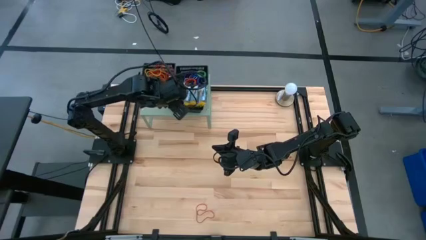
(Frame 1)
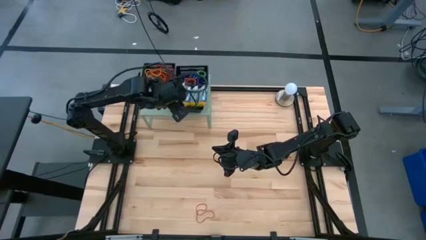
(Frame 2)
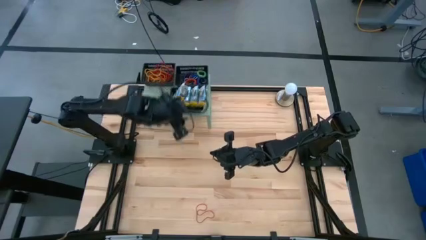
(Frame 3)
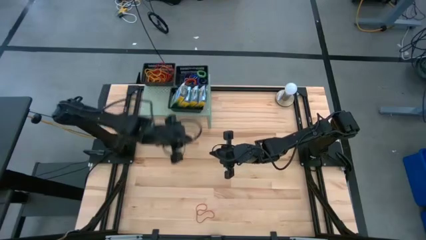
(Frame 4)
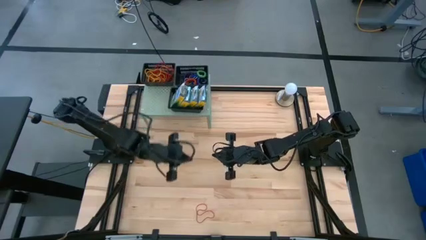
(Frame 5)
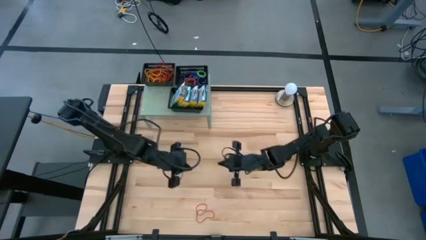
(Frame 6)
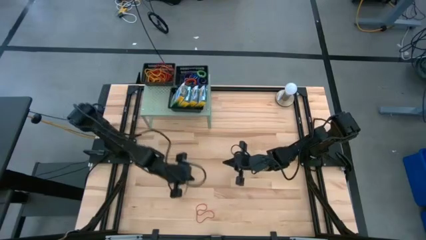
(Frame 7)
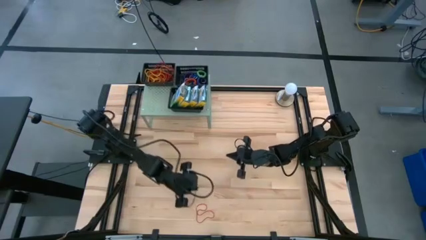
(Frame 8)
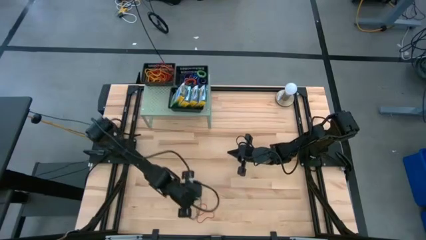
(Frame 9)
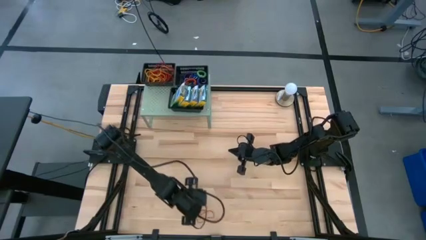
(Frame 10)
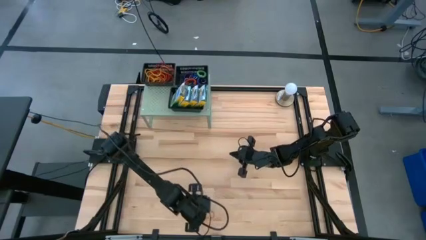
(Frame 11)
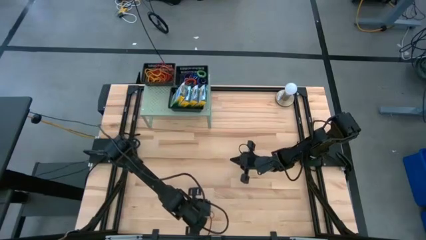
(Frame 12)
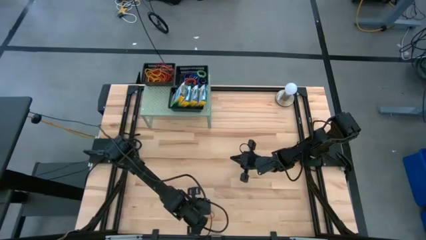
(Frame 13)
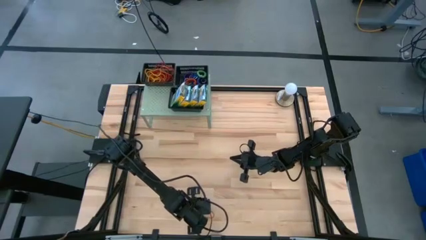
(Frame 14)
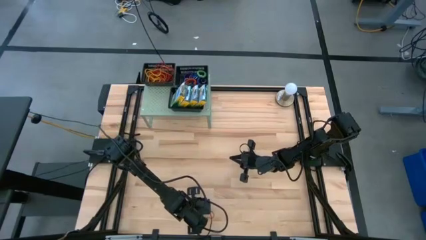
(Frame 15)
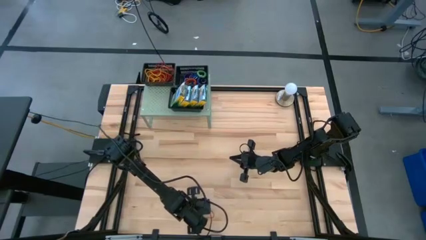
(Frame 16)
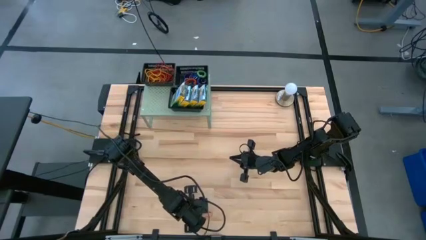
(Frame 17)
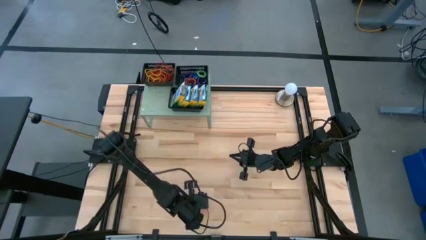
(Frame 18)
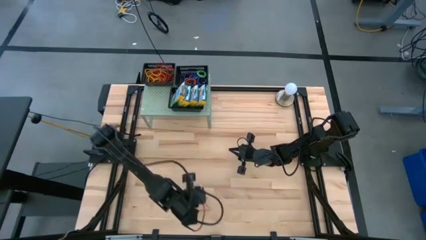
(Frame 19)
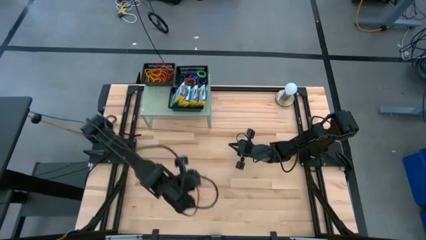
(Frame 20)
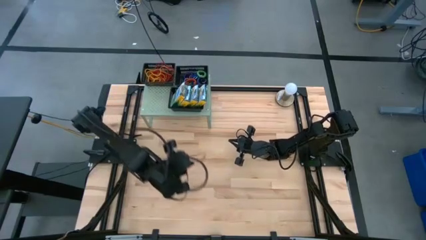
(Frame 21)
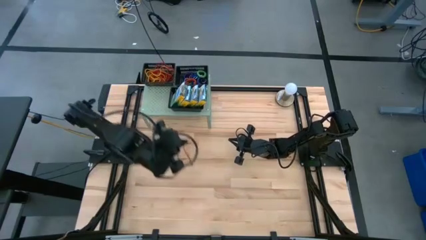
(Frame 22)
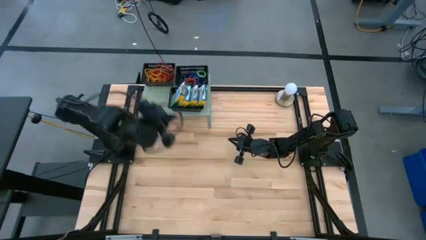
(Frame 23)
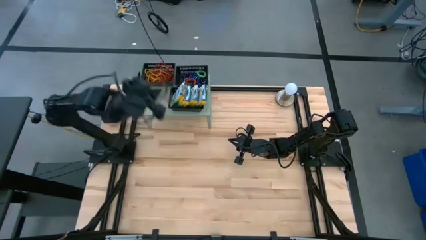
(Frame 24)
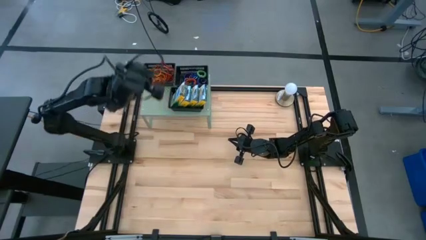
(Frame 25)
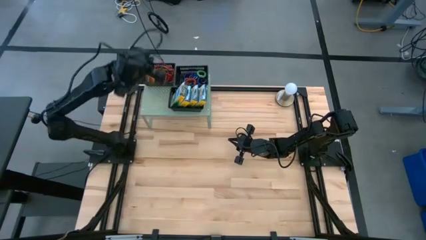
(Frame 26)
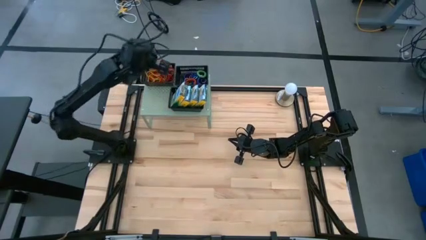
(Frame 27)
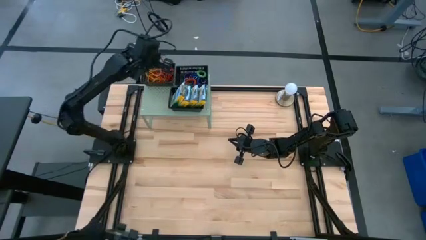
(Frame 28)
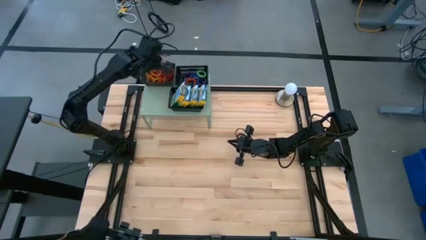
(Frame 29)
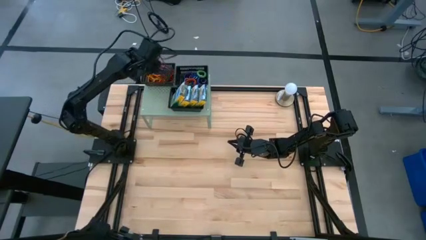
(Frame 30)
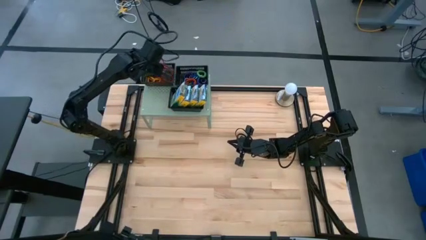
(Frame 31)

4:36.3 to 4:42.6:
Task: Pick & Place Office Desk Supplies
Put the red rubber band into the top left black bin on the shelf

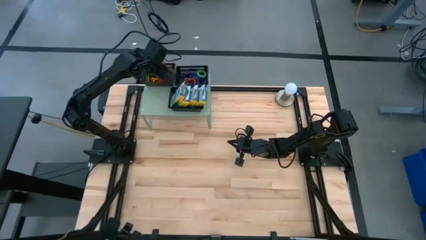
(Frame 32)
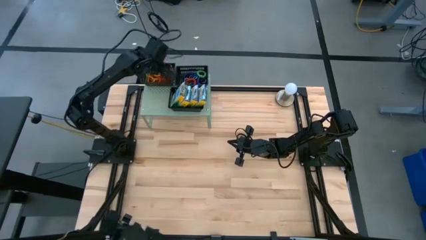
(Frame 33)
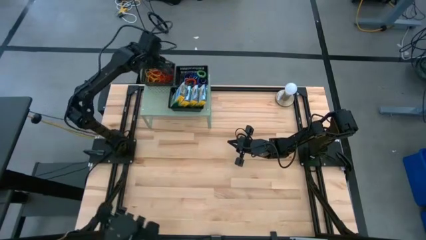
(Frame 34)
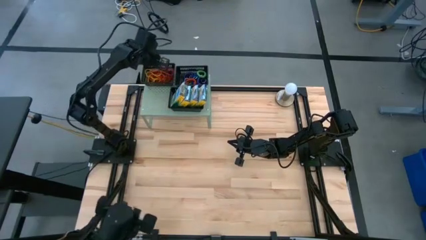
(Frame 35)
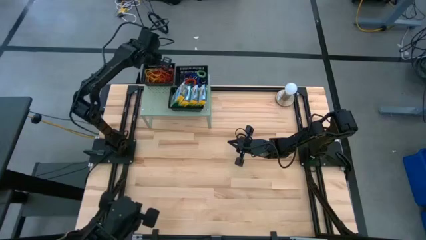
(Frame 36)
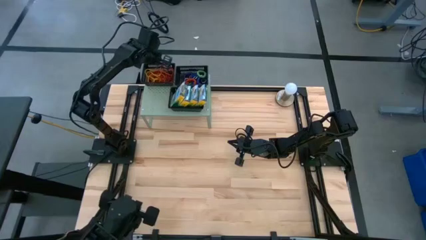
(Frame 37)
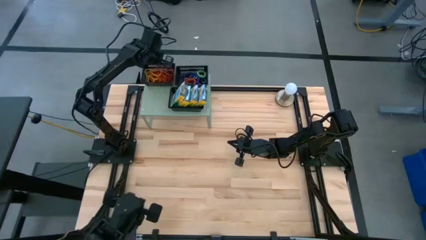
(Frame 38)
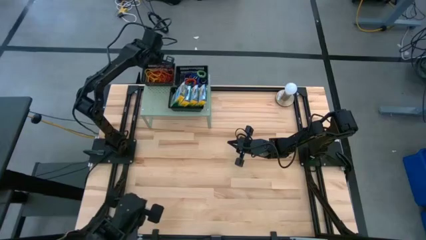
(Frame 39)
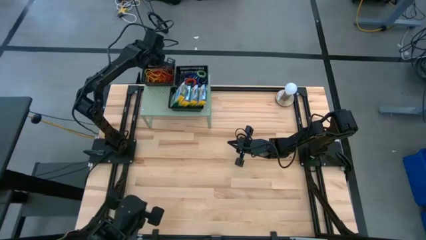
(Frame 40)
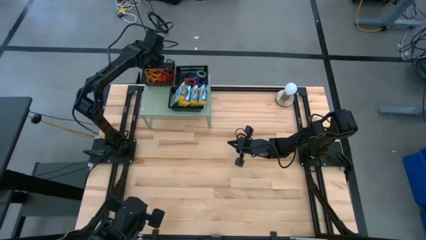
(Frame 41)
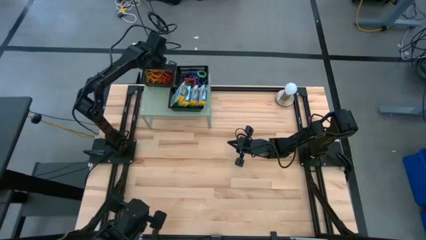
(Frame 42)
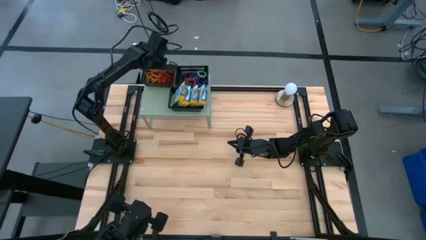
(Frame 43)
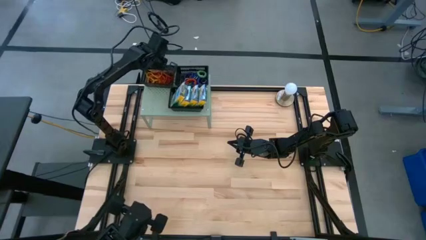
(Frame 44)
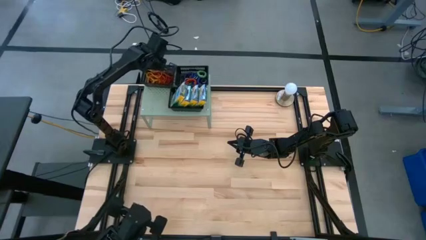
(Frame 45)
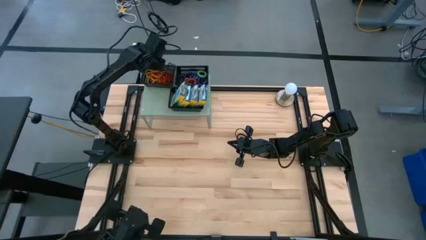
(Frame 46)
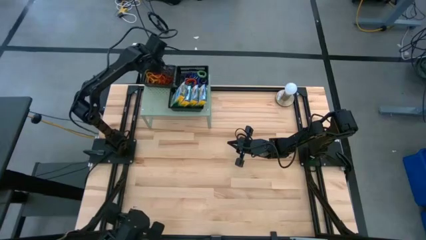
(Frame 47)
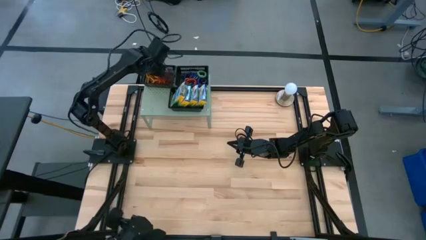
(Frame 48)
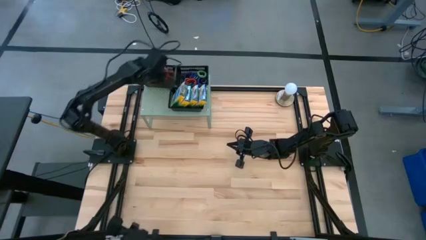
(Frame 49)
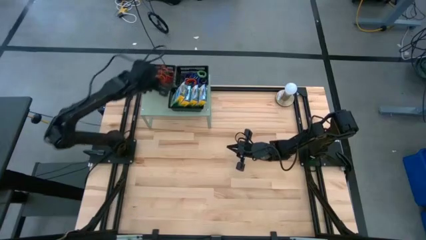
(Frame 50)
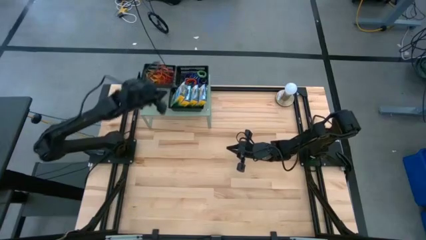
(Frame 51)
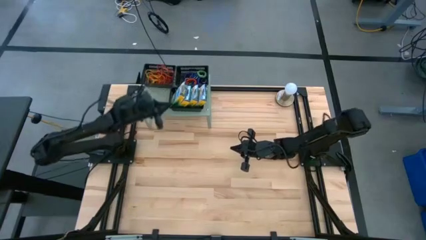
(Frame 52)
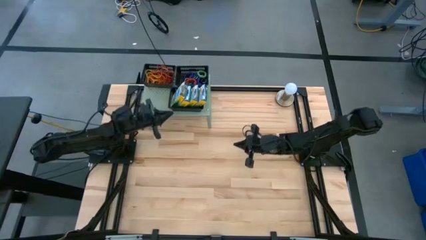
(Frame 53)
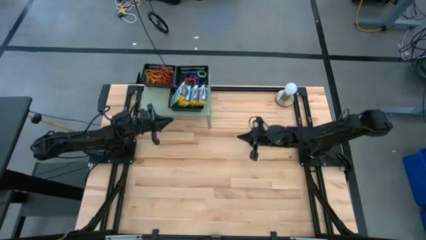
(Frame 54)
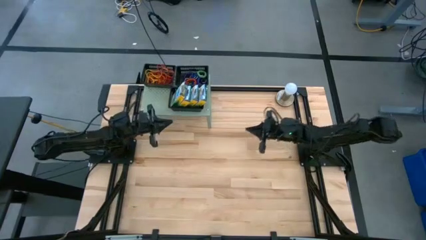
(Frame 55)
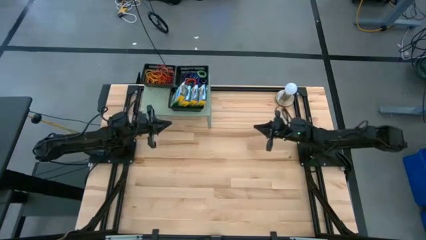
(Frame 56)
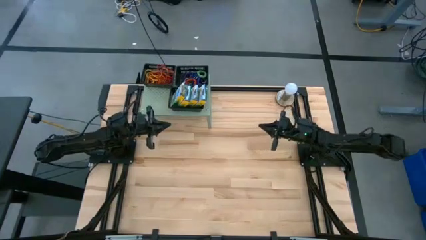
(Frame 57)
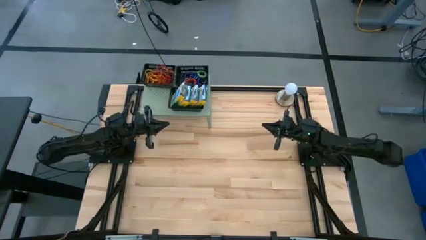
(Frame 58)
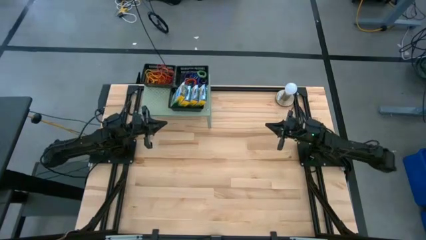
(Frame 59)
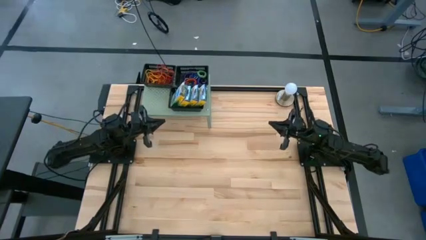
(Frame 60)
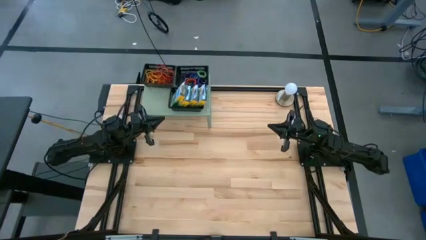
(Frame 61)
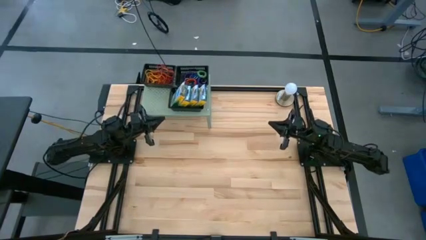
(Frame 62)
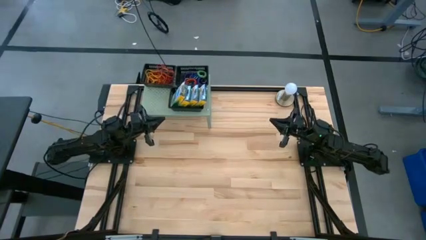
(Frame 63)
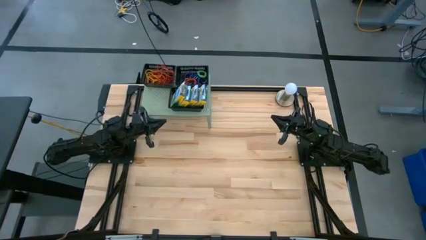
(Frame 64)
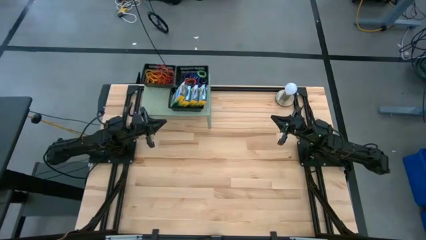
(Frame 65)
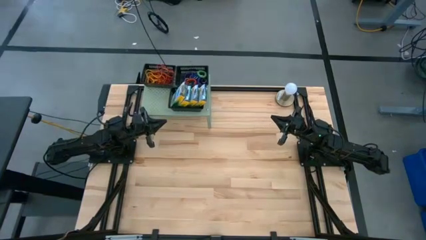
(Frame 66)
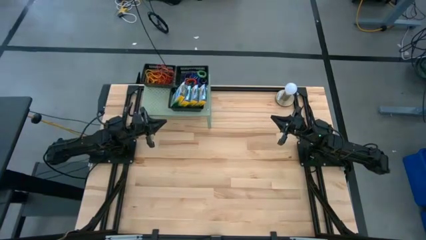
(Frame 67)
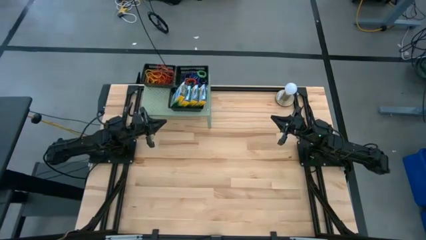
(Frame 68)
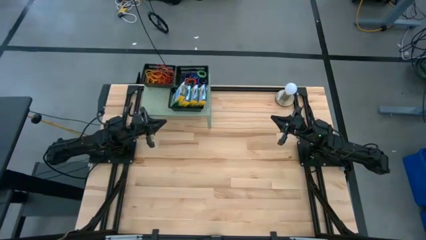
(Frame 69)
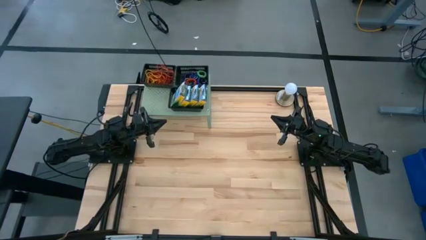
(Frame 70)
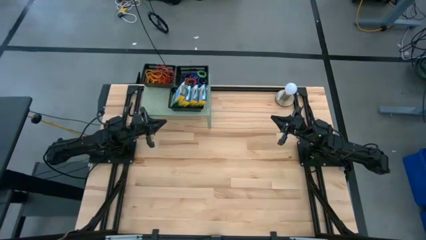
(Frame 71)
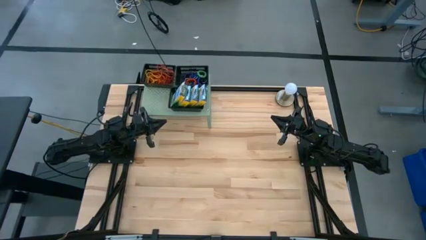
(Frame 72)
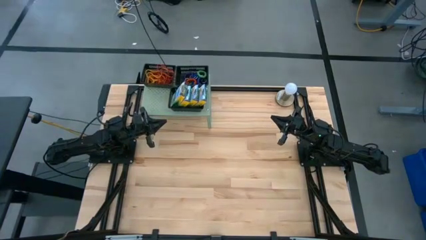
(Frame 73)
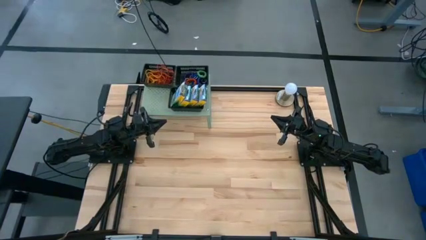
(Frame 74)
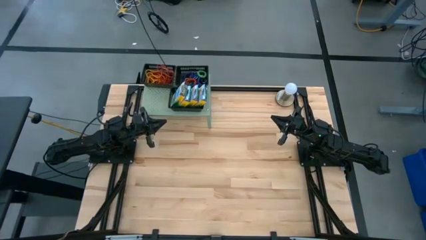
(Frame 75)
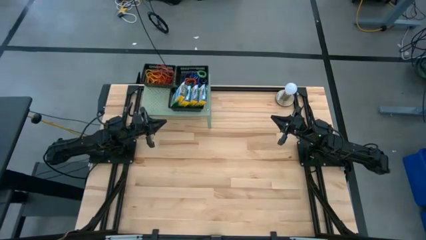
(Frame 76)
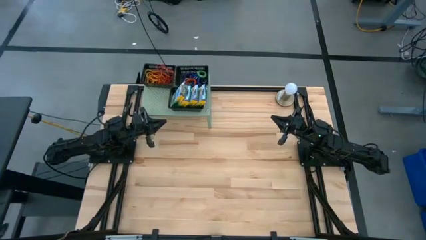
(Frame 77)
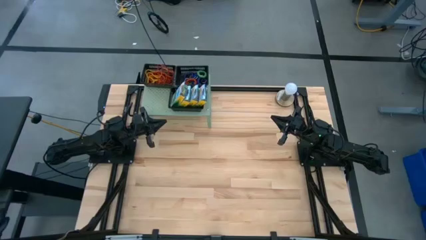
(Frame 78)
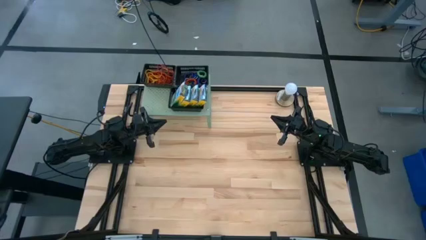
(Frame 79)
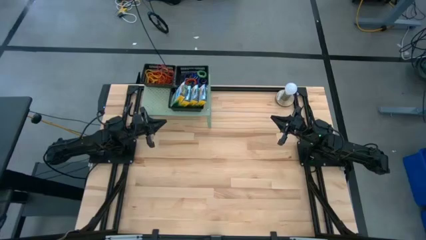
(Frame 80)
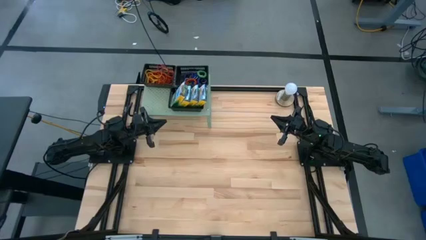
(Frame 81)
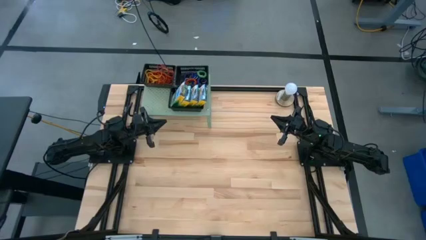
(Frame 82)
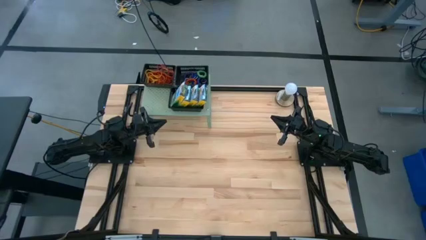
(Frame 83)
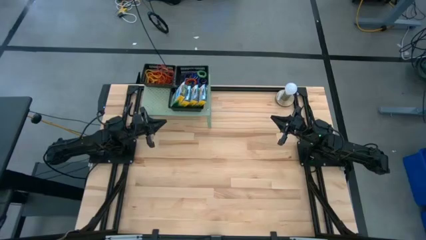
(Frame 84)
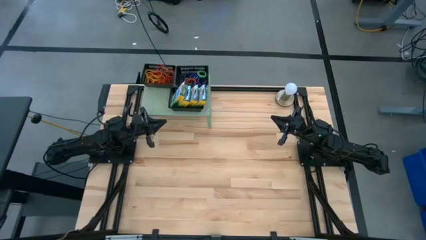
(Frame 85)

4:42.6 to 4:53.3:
Return to Home Position
